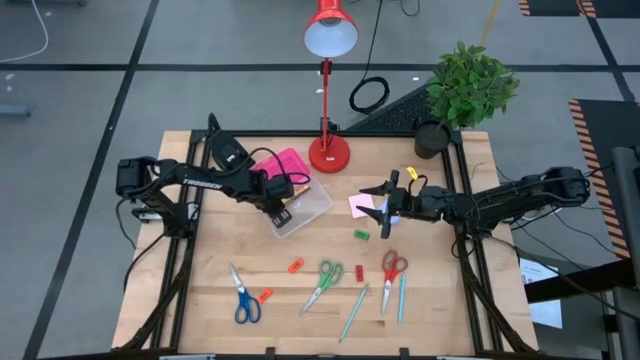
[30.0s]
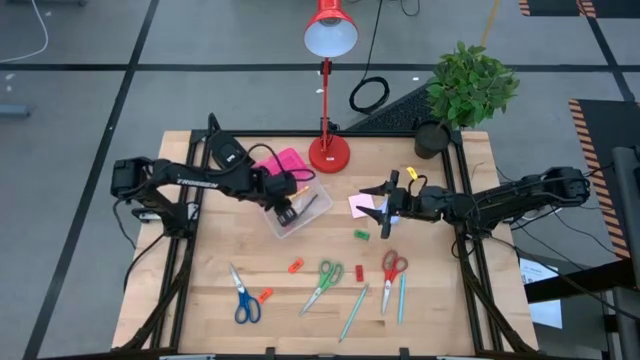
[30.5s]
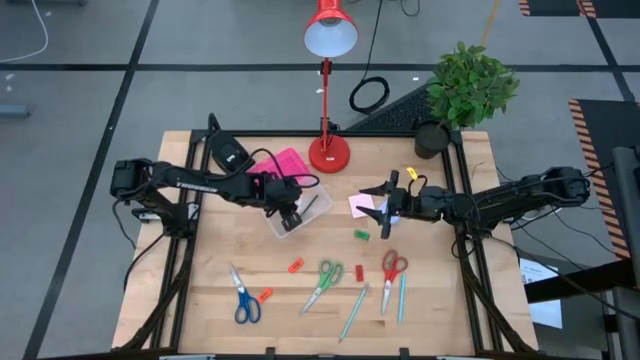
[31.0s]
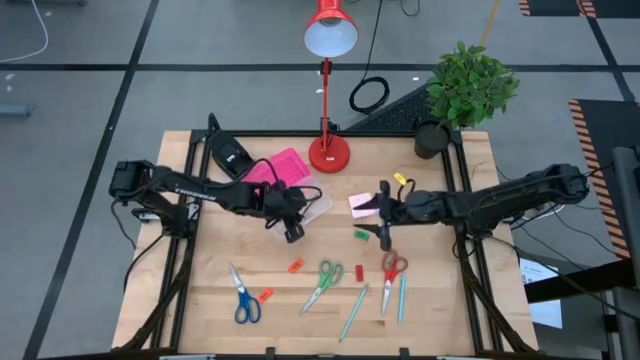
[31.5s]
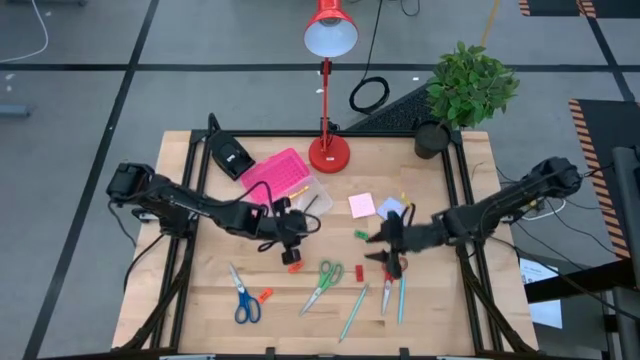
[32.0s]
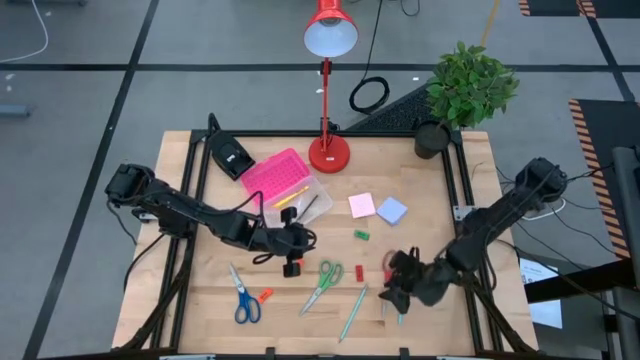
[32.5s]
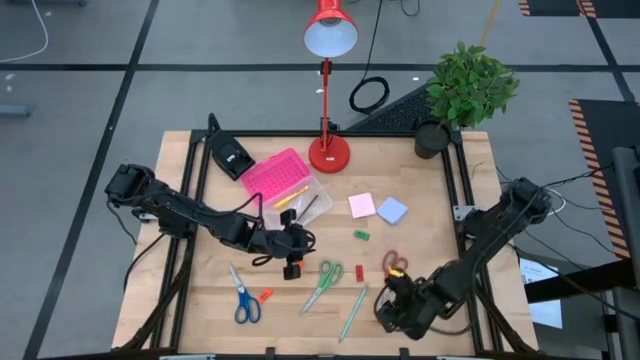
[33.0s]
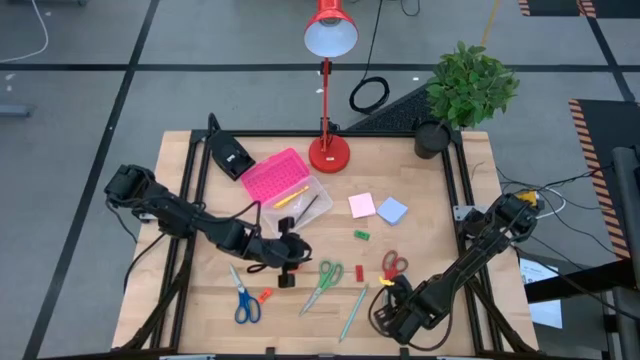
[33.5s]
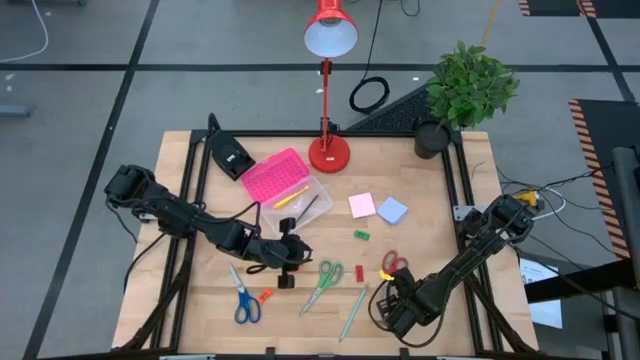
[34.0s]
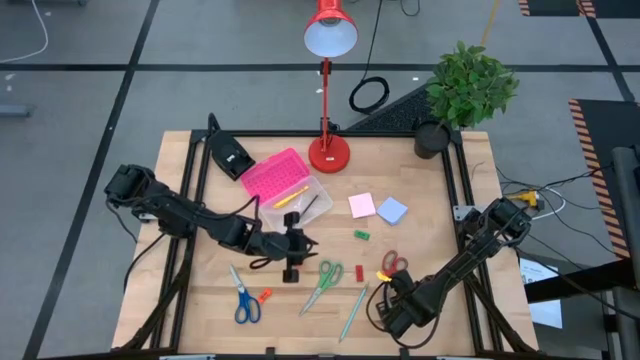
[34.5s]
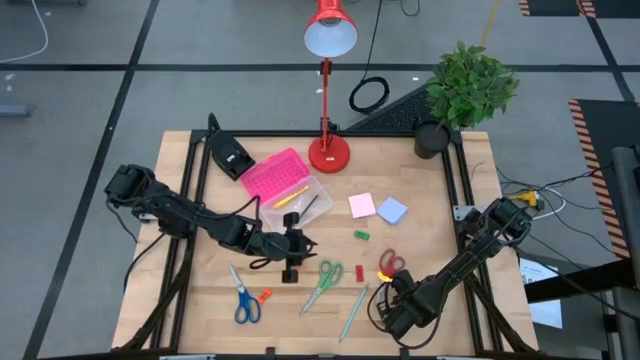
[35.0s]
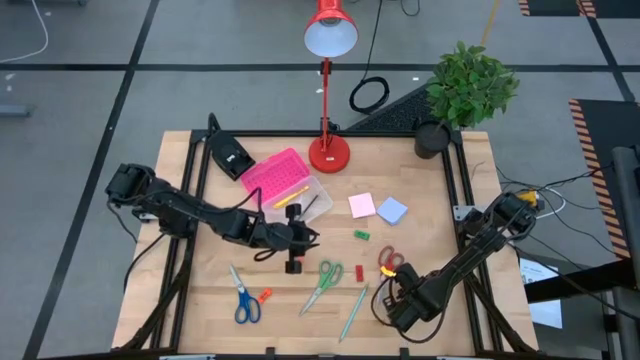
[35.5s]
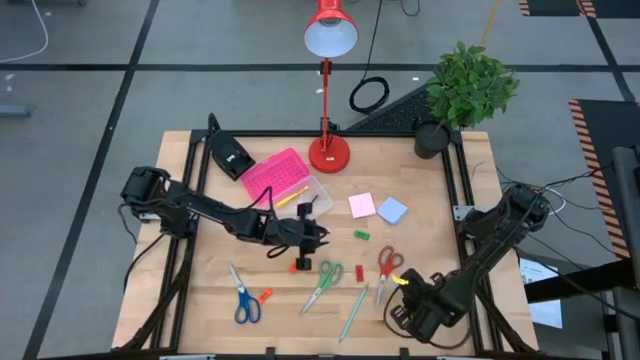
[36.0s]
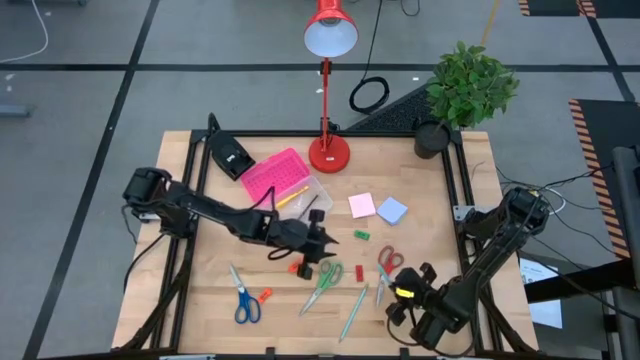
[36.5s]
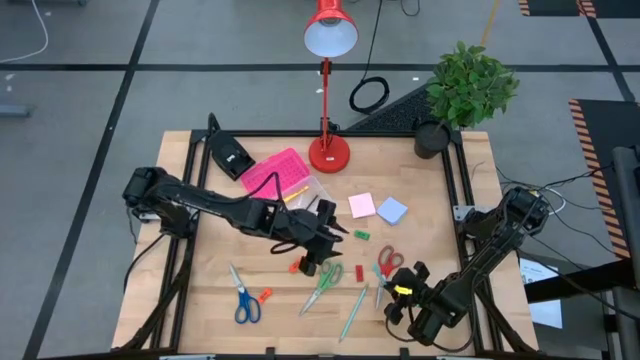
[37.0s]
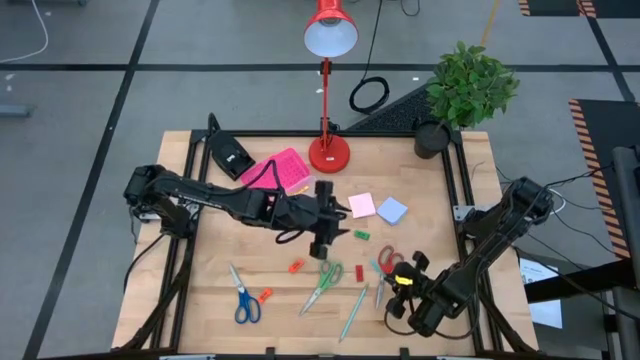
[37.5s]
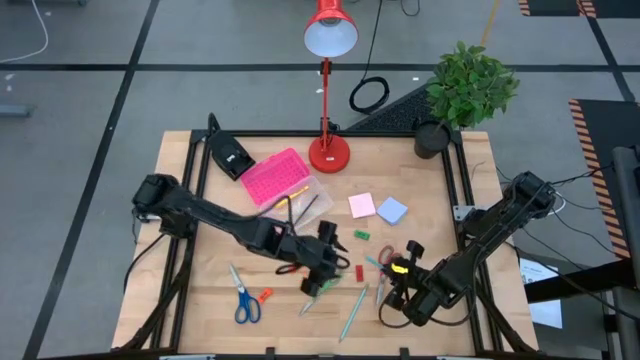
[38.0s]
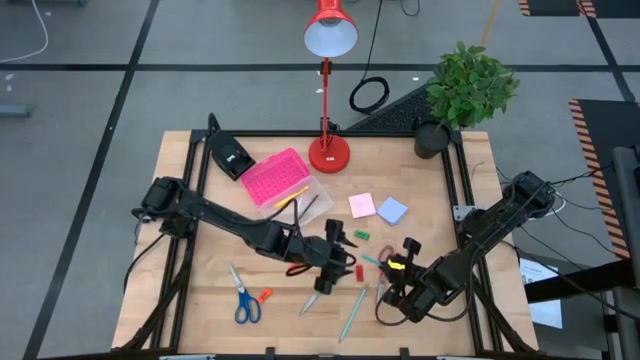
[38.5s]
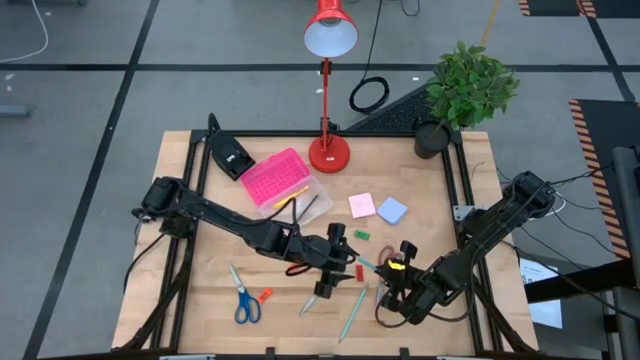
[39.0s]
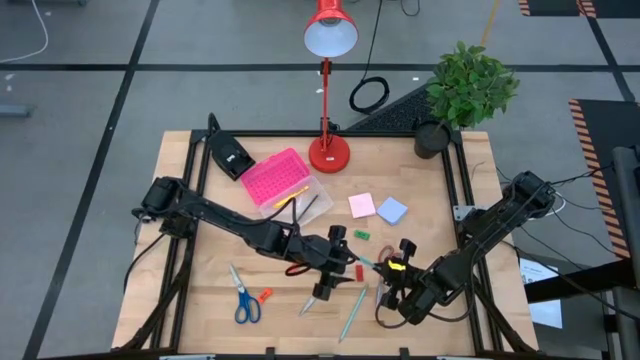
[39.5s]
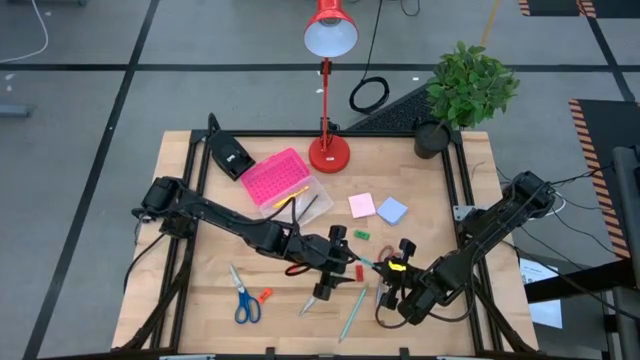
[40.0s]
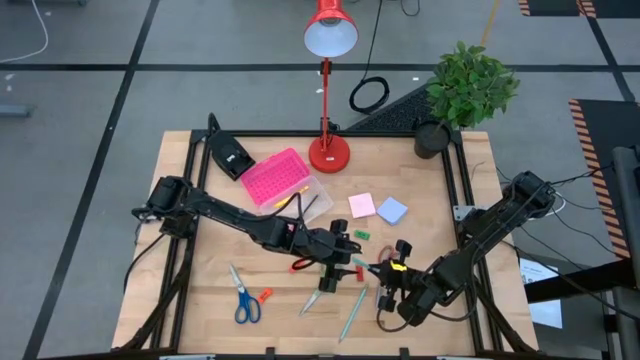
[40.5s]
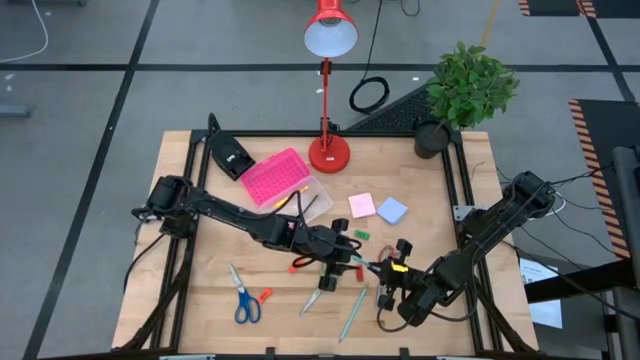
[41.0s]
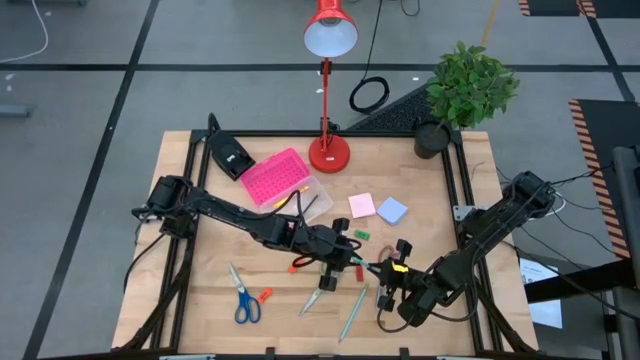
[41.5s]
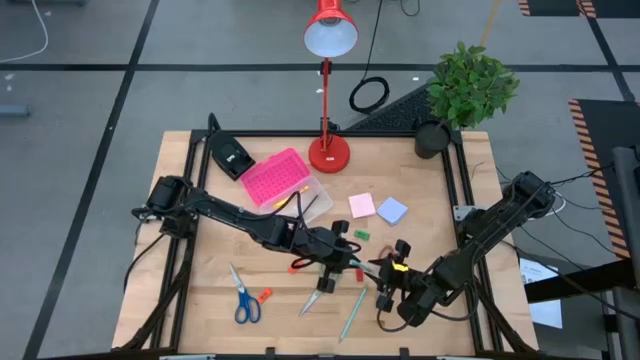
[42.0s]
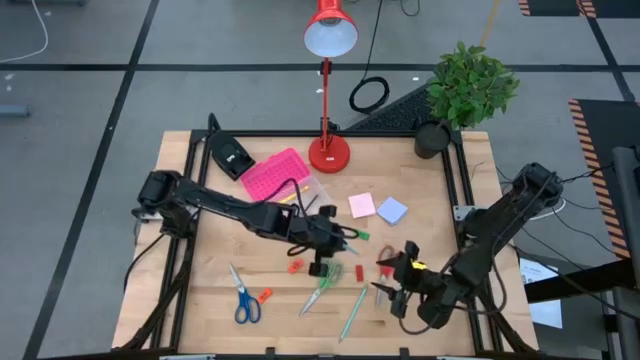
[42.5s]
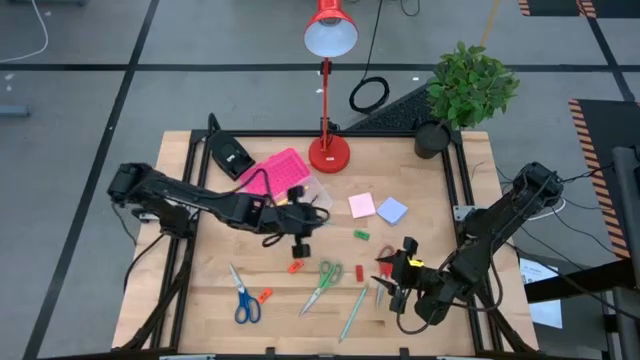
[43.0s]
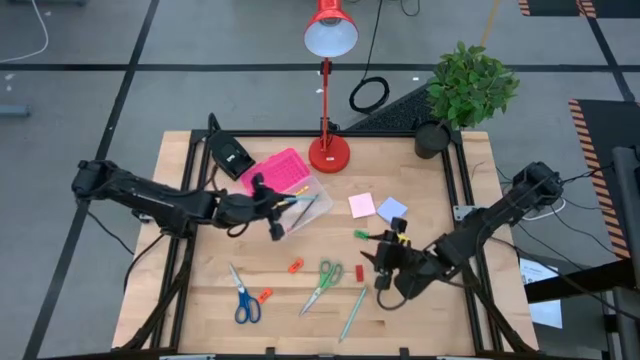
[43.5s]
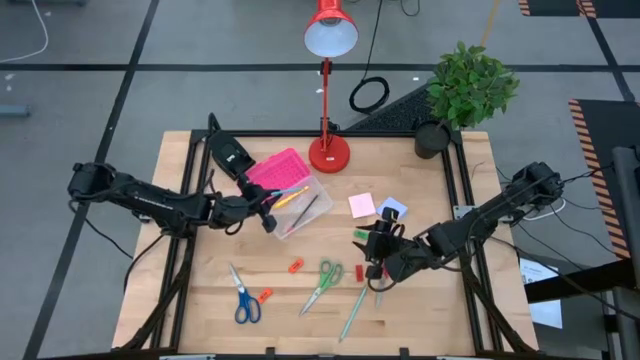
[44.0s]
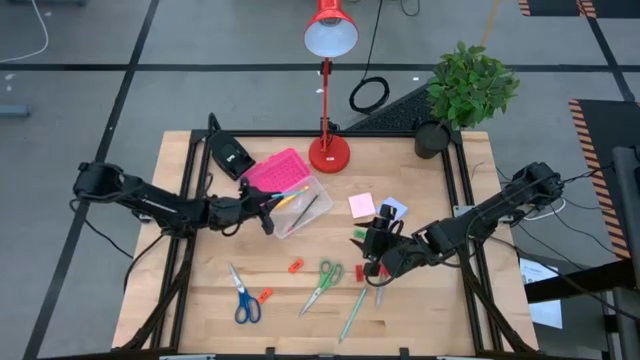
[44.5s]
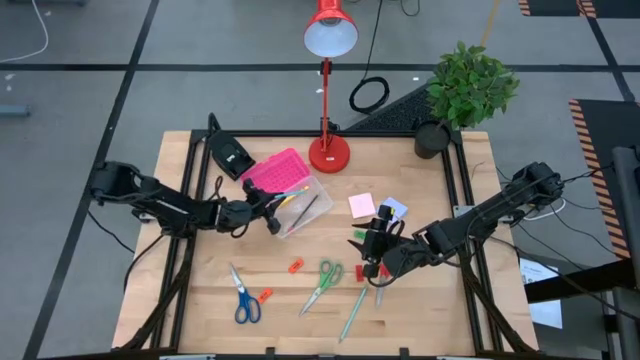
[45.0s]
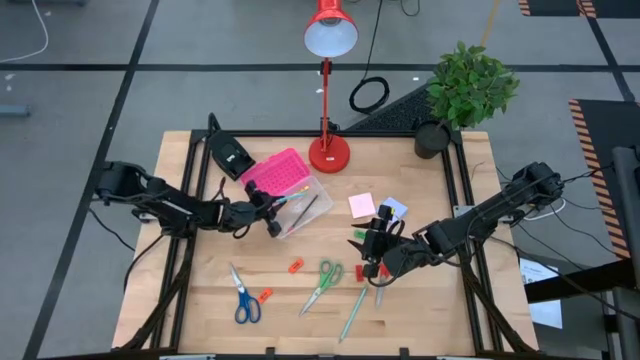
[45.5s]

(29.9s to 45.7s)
Task: Pack school essentials
Put the light blue pen into the pink supply box

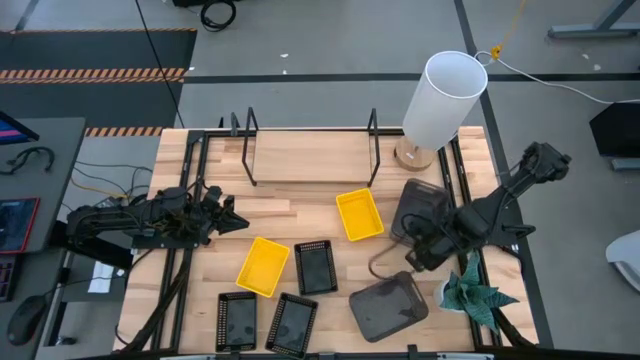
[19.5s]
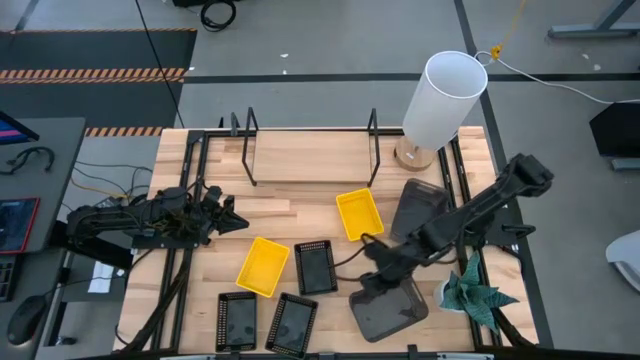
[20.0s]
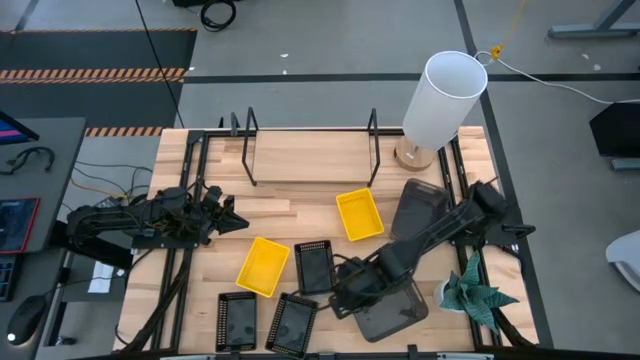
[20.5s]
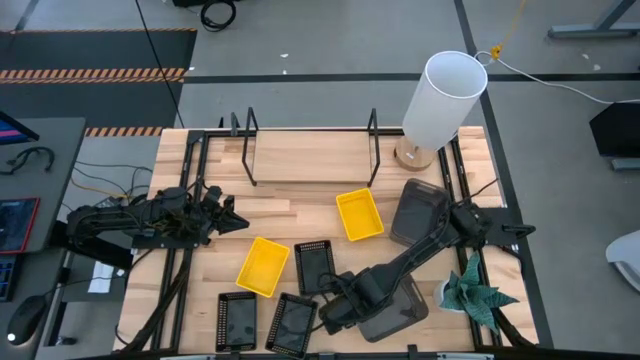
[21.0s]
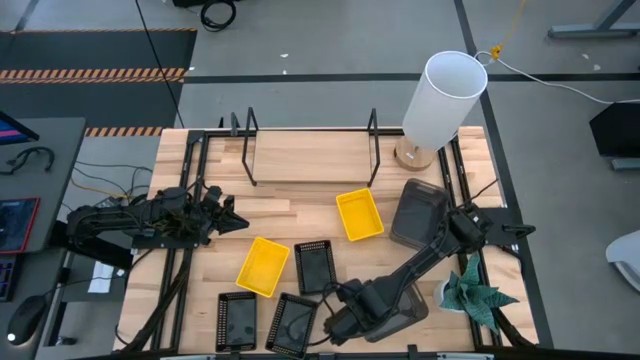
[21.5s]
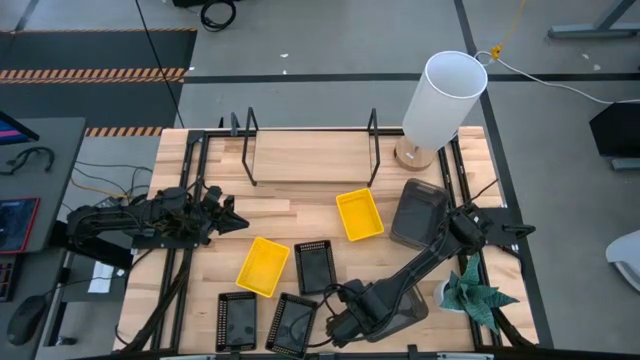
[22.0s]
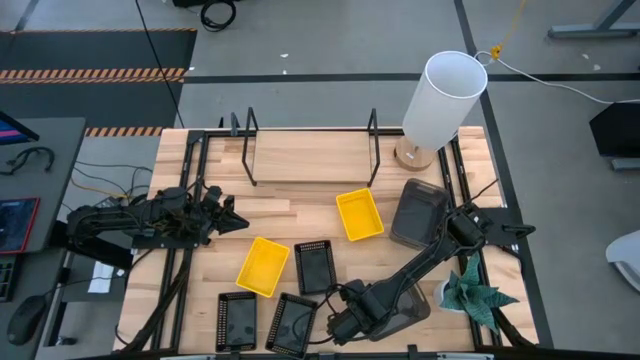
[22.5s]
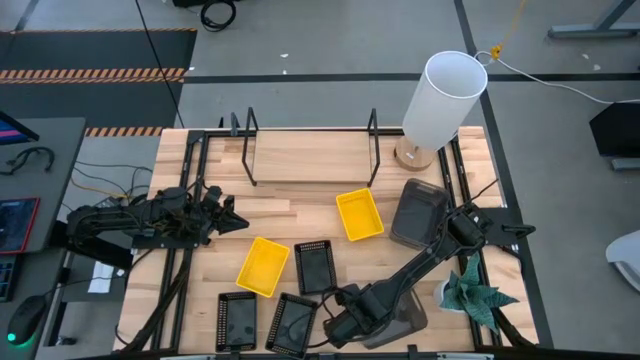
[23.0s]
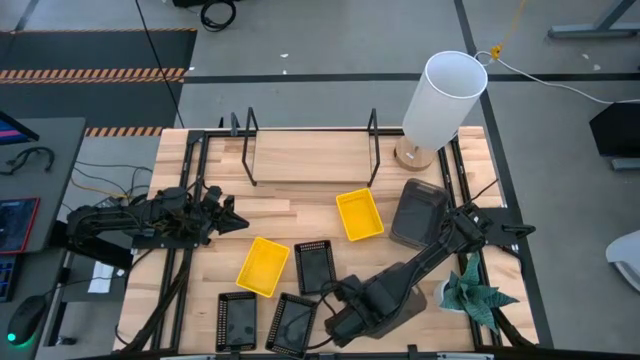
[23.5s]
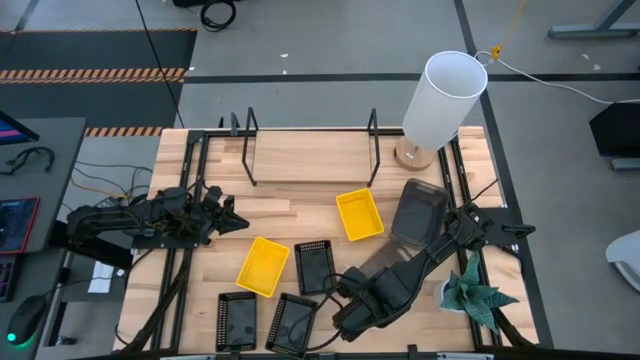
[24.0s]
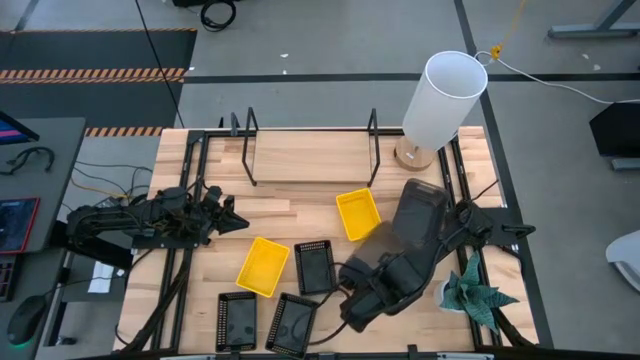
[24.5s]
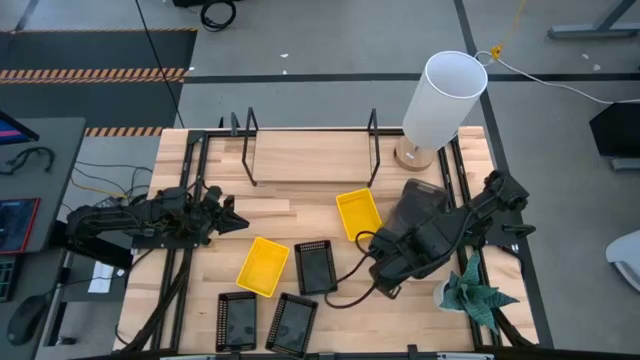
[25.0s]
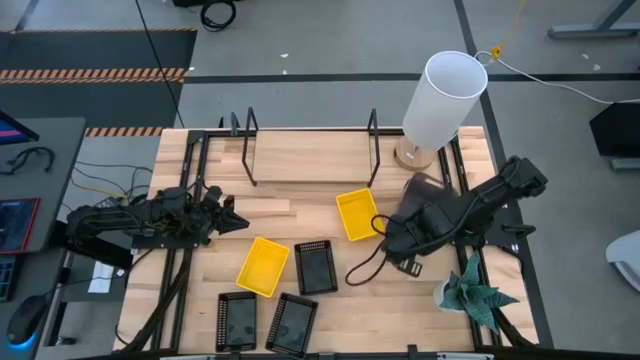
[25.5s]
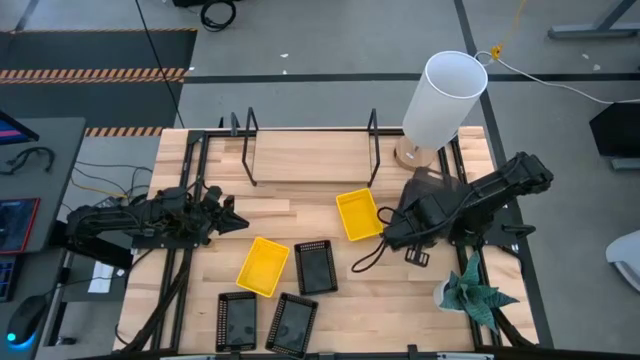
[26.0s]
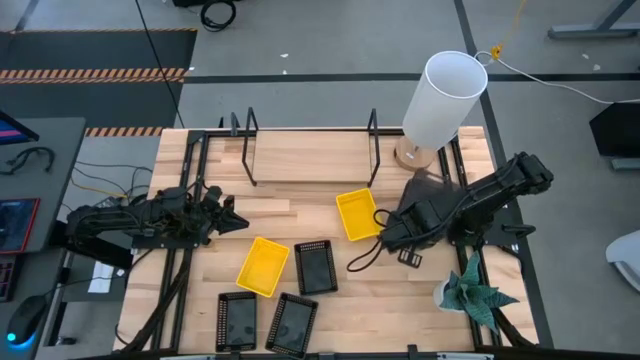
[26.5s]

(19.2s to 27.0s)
Task: Stack baskets on shelf by color
Stack the bottom black bin into the top black bin
